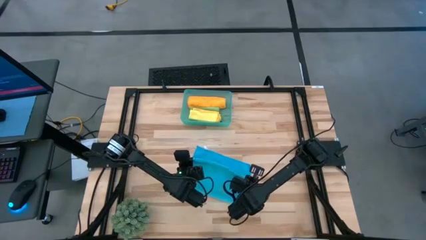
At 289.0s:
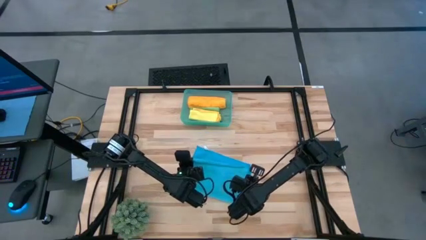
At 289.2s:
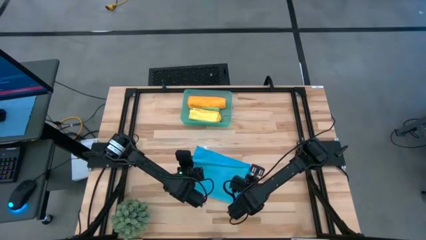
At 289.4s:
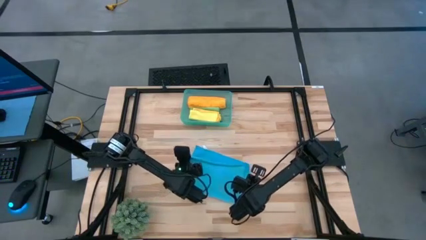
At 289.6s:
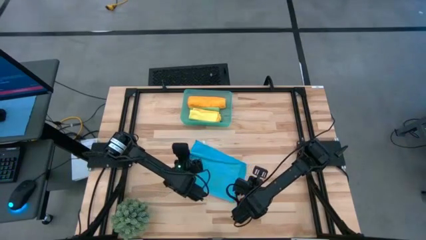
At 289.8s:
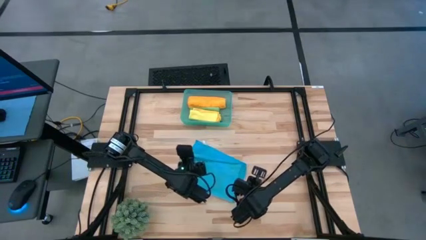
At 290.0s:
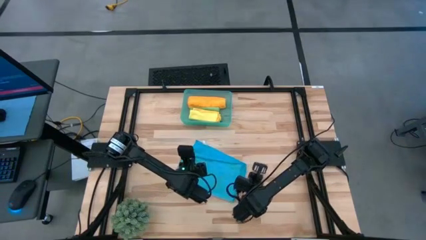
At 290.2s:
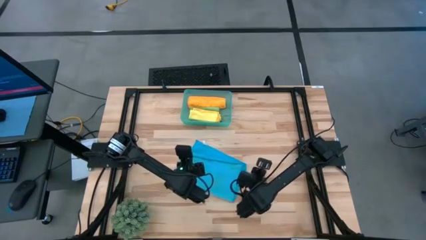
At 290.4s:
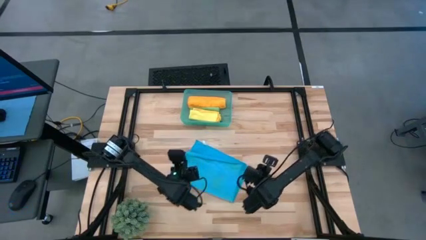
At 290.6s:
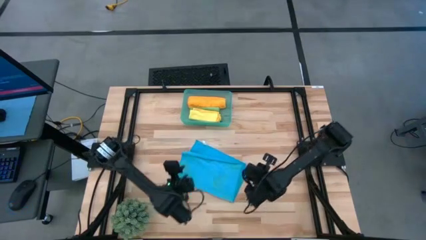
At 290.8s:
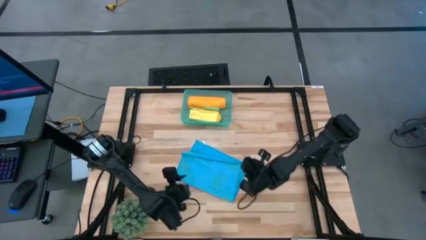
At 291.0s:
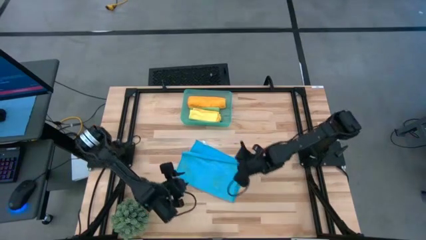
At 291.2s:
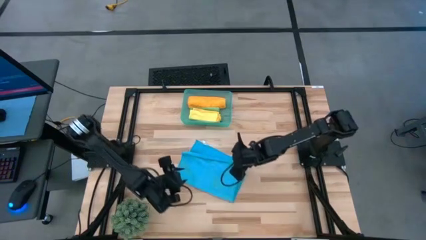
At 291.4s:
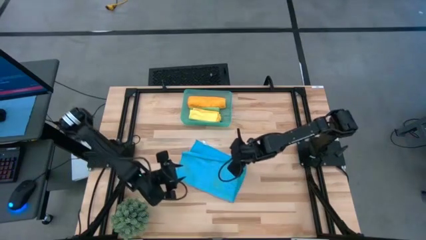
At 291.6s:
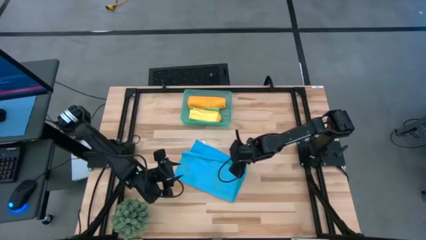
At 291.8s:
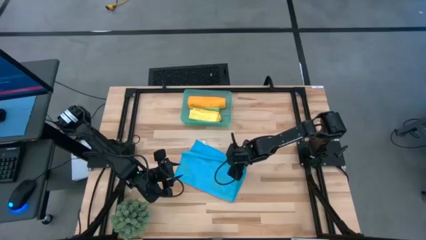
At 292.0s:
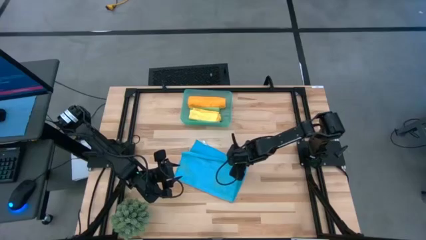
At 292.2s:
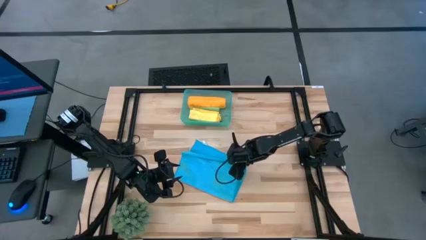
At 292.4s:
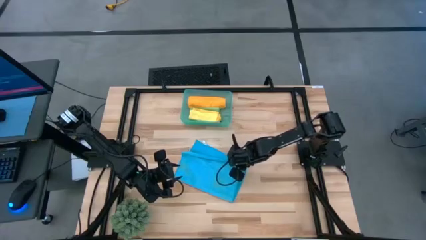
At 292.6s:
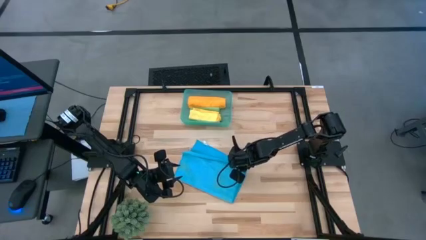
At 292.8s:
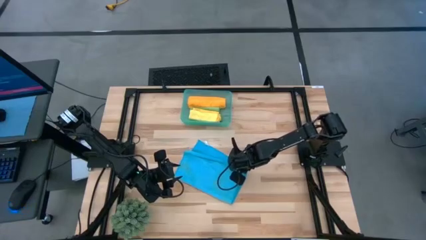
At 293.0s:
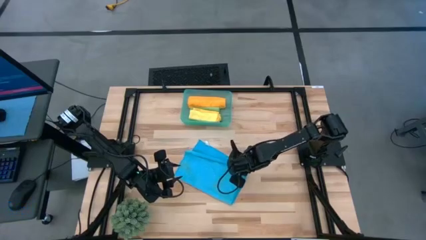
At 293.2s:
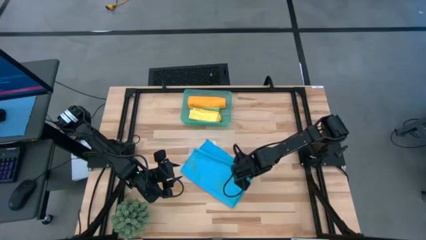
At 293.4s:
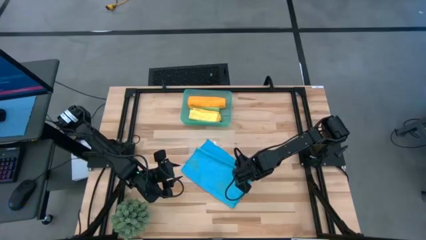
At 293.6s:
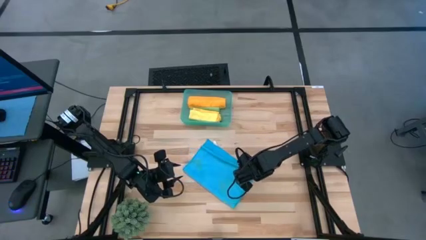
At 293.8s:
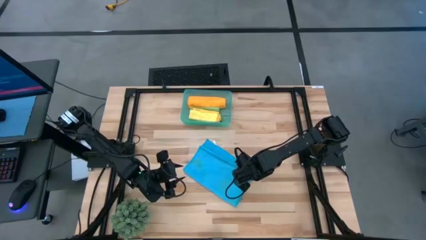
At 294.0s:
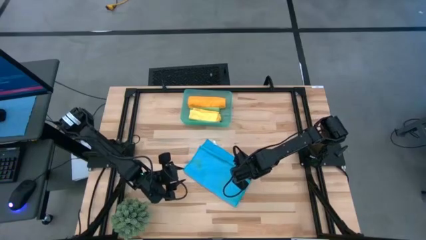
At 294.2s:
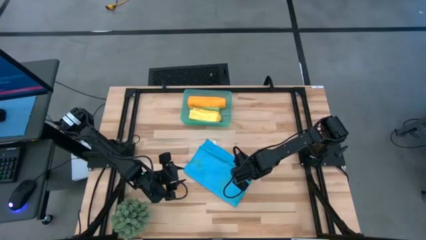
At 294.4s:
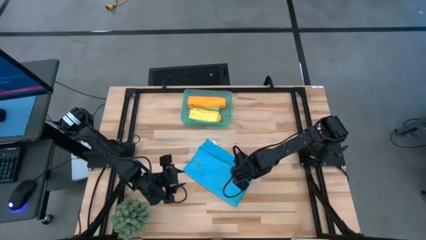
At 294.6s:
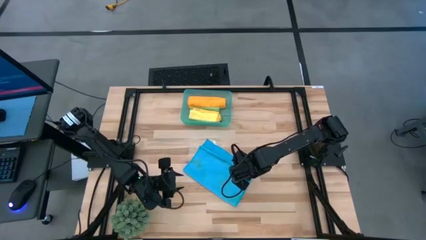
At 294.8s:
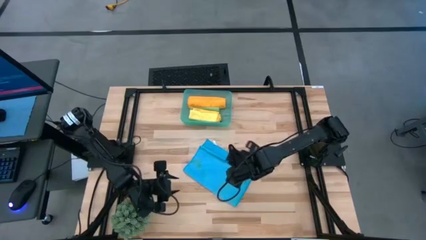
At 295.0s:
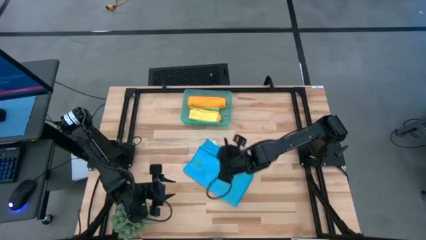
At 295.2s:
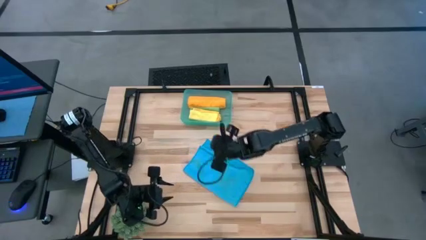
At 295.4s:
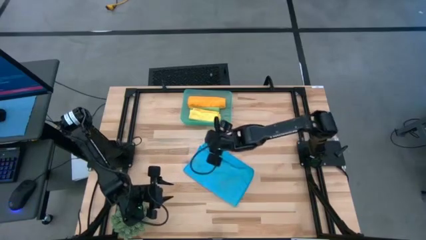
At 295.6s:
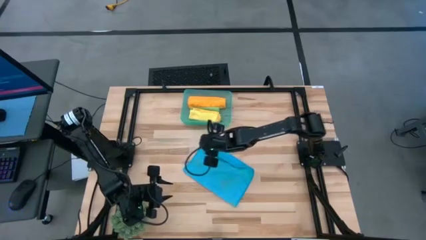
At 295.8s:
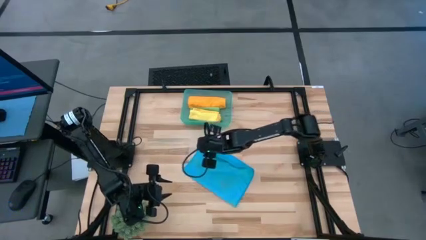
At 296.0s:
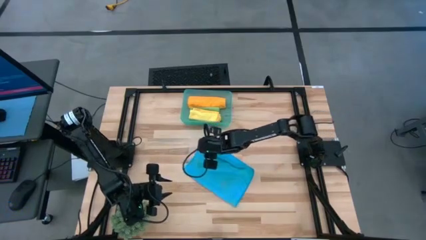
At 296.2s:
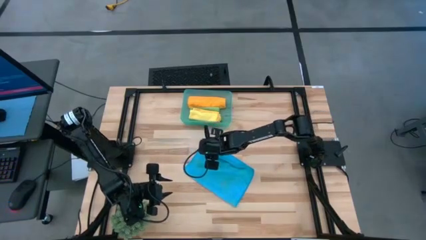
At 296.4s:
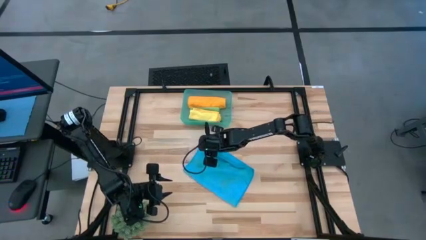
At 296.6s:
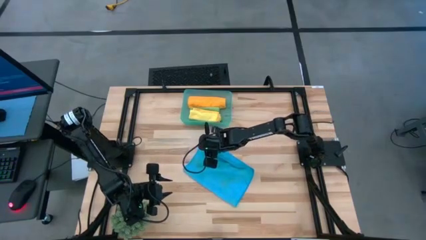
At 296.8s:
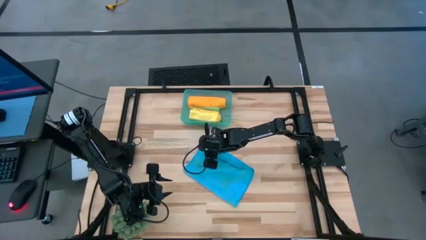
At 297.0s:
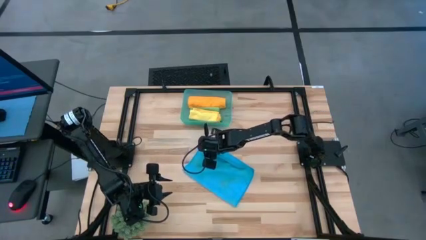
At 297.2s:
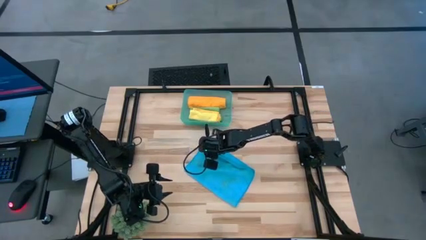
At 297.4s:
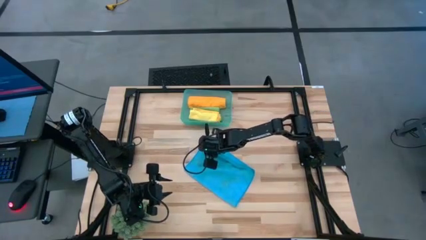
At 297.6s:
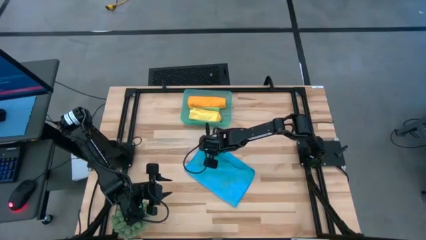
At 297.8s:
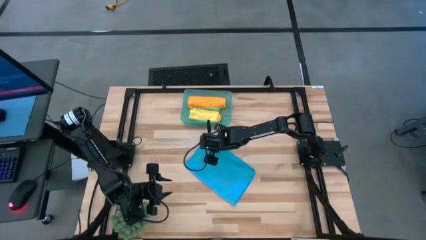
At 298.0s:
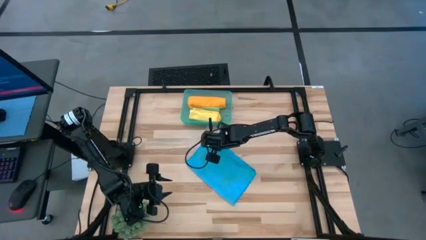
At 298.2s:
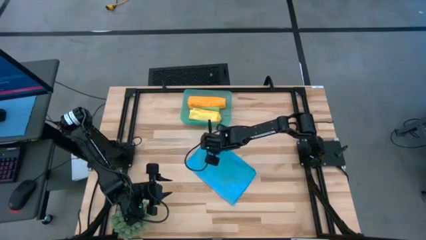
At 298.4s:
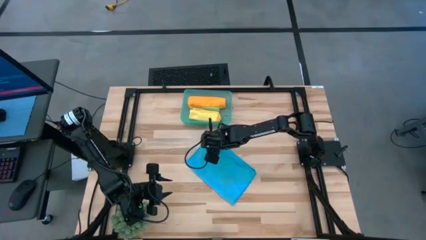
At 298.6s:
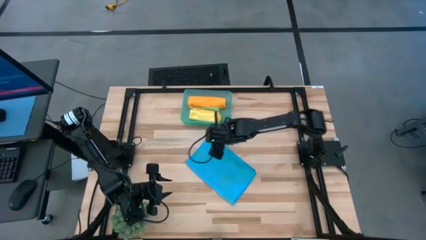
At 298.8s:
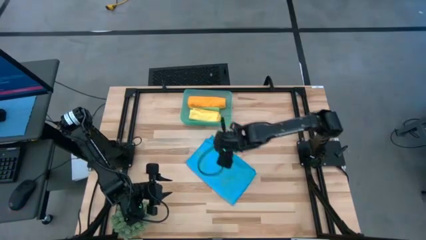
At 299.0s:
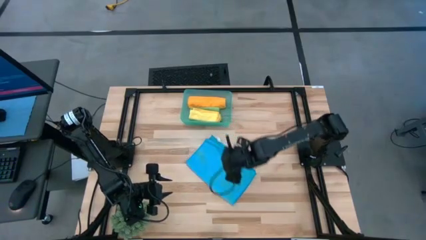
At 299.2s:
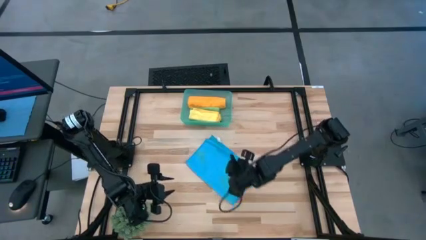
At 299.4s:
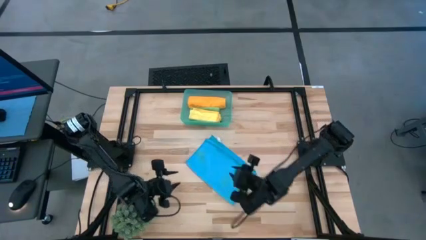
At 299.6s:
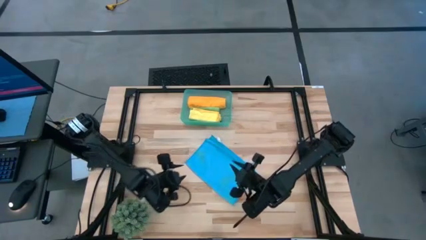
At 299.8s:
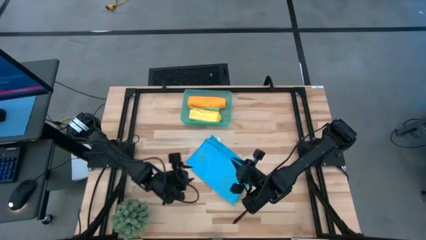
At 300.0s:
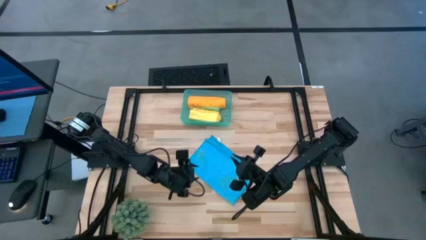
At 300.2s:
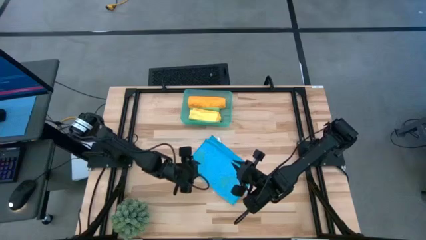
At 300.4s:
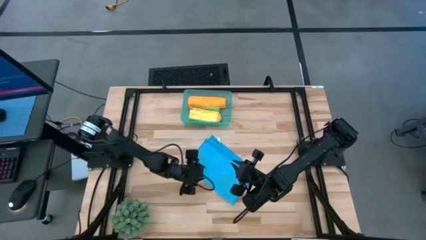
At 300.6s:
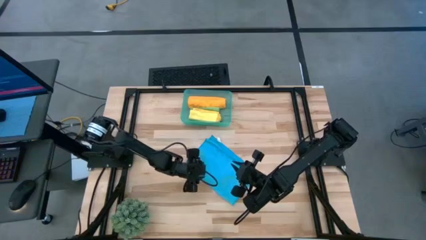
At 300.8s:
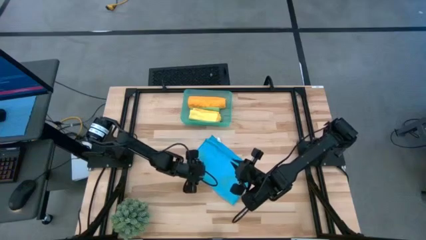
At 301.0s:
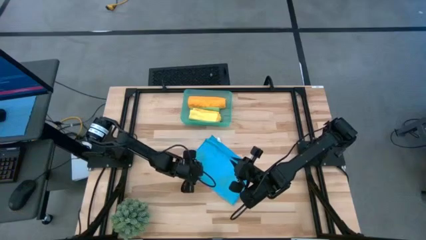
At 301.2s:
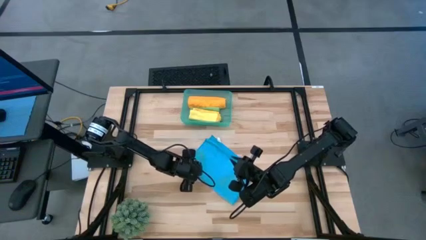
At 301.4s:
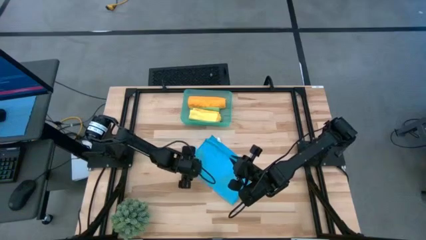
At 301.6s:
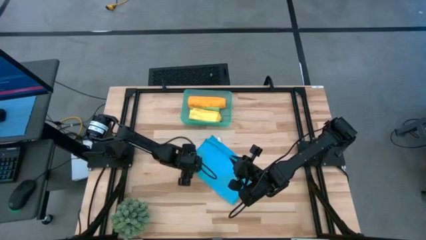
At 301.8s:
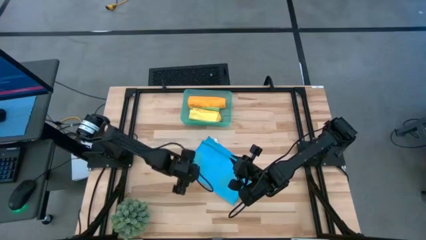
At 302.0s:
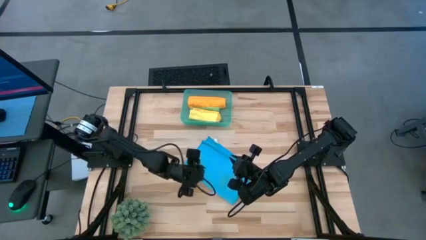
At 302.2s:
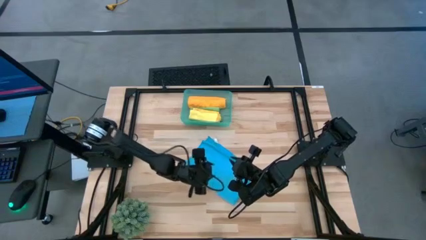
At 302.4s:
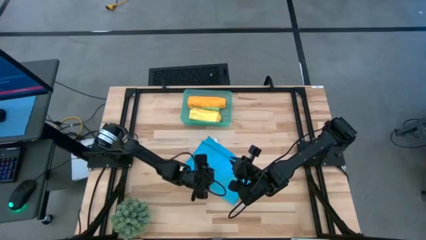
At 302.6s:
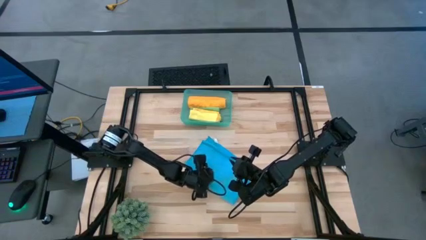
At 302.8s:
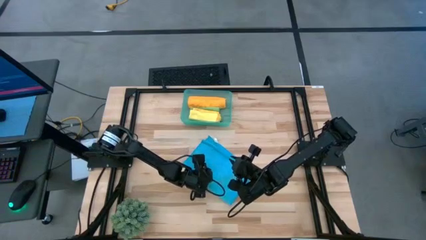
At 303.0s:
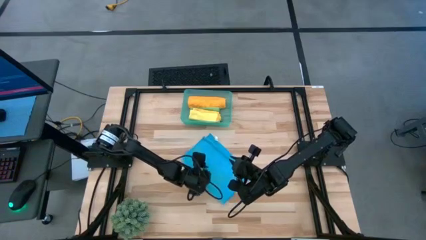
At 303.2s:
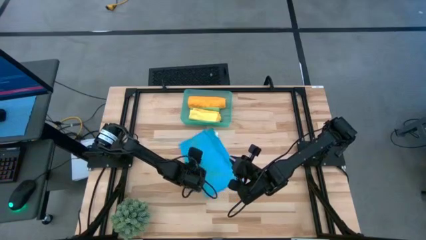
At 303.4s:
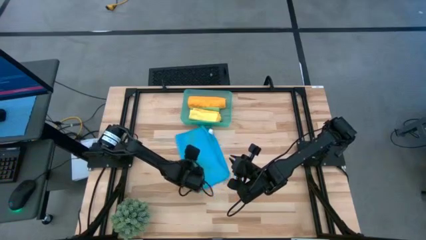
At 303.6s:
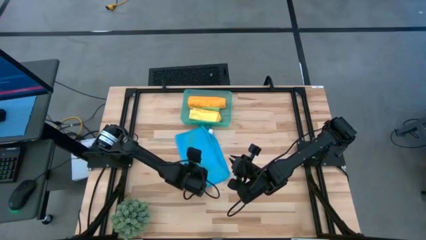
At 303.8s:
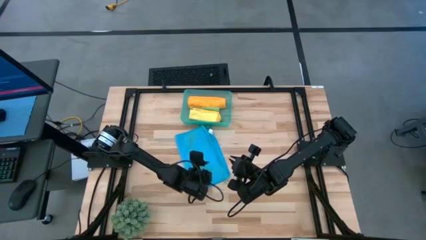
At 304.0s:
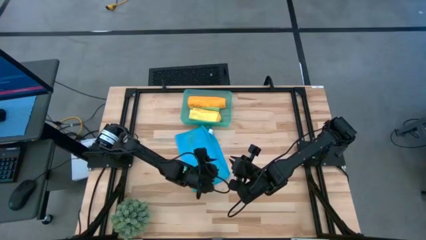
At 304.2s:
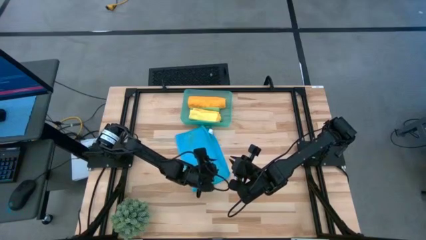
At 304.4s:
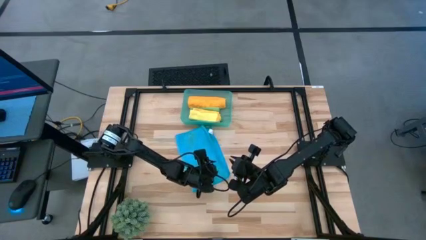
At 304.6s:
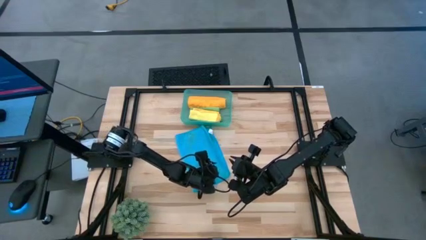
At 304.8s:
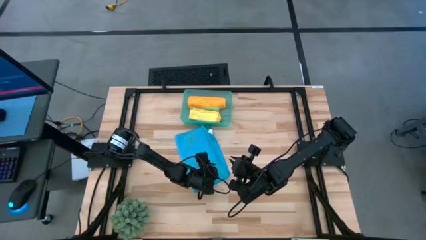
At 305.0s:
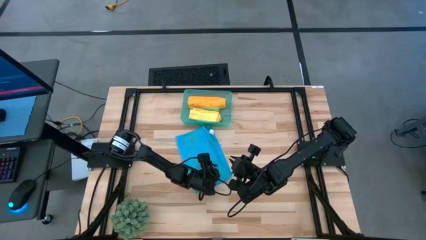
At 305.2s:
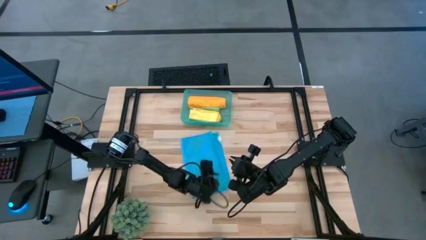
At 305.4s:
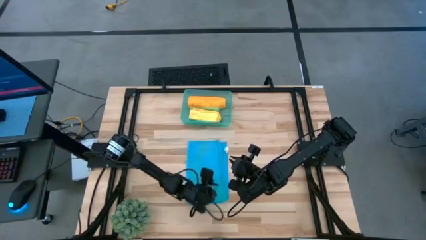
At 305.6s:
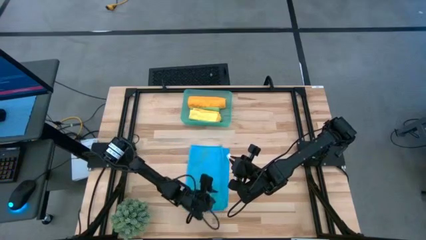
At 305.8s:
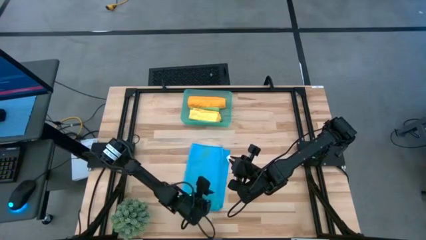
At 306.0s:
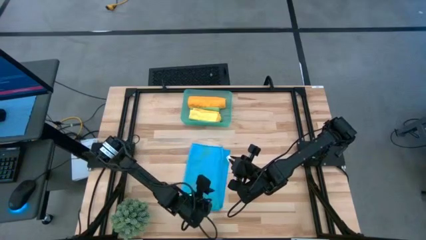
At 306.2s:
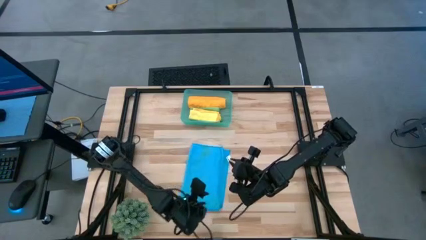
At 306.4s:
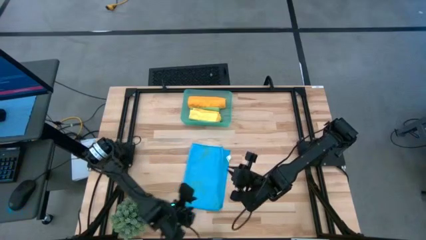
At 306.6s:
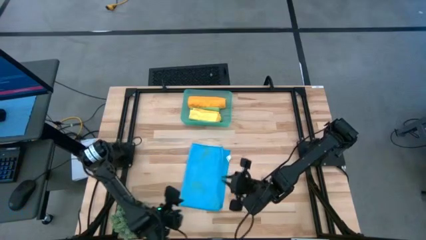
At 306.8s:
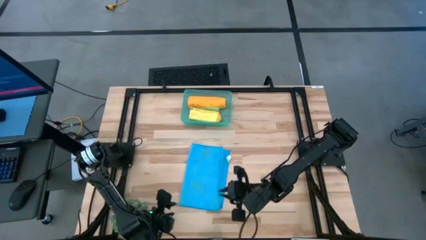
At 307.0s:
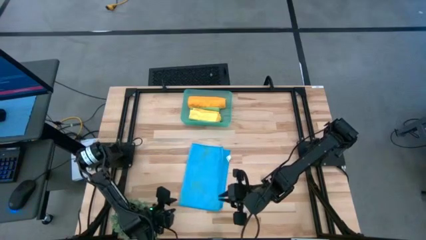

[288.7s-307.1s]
Task: Roll microfiber towels into tight, uniform cylinder then place into a basket
Fold the blue towel
